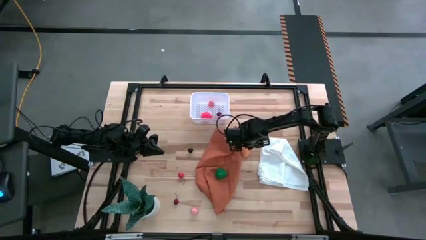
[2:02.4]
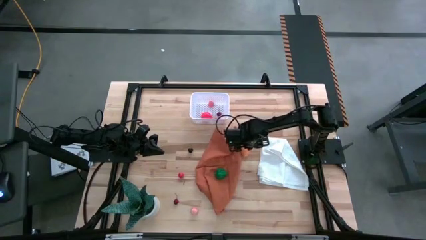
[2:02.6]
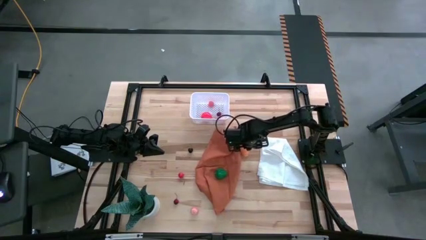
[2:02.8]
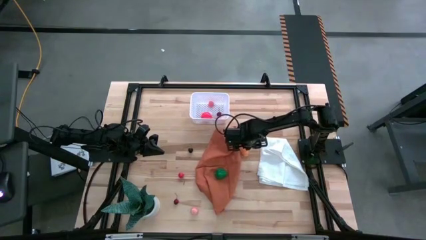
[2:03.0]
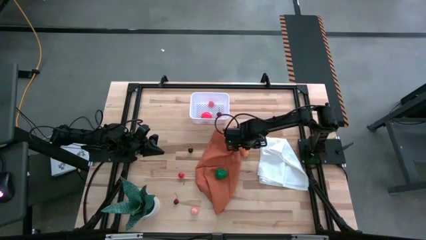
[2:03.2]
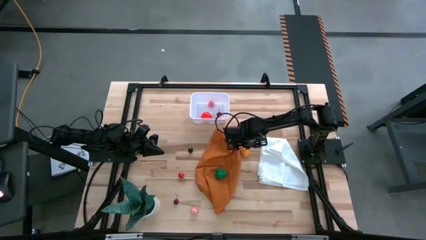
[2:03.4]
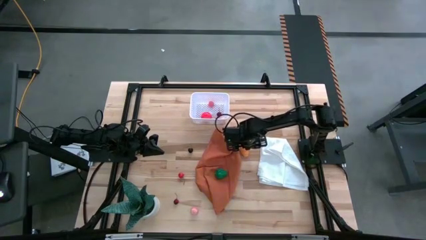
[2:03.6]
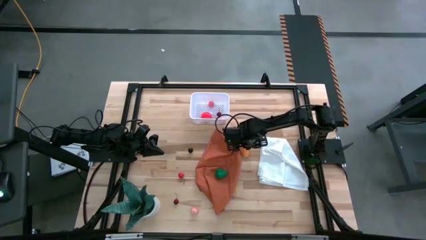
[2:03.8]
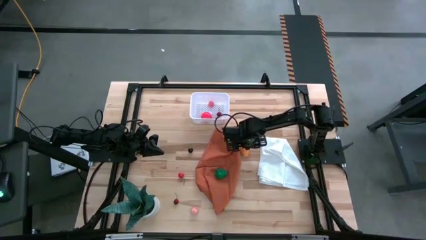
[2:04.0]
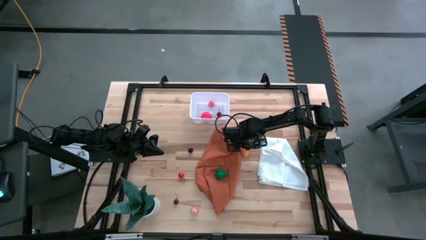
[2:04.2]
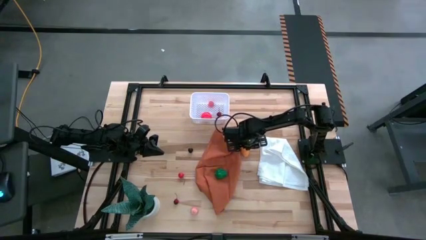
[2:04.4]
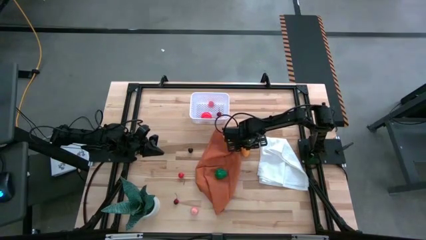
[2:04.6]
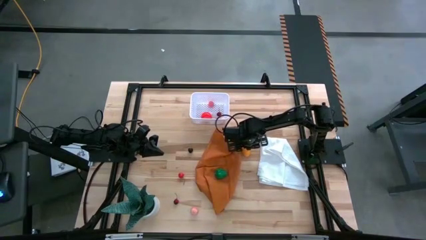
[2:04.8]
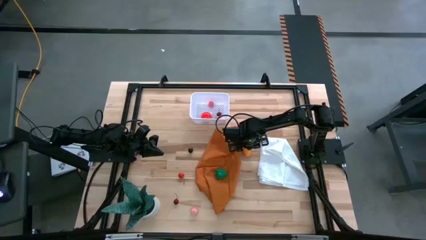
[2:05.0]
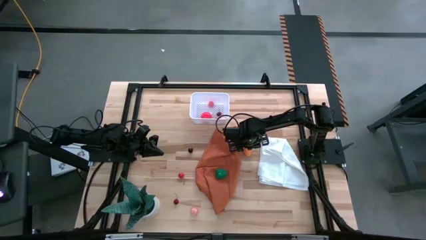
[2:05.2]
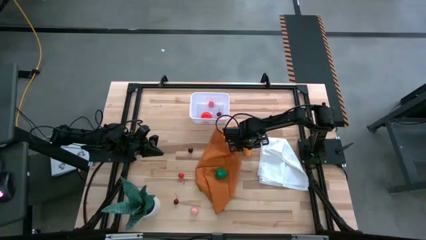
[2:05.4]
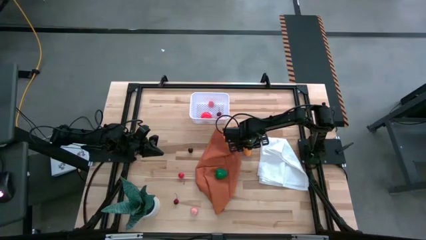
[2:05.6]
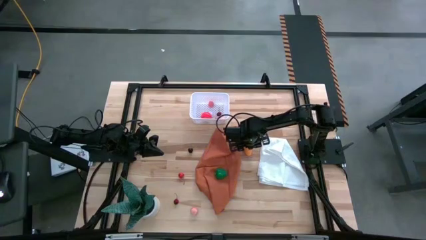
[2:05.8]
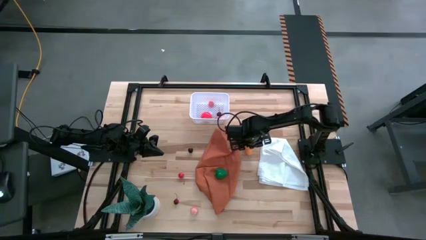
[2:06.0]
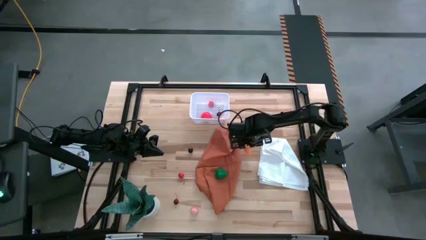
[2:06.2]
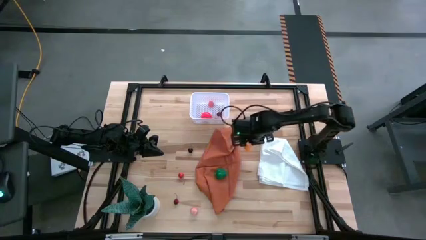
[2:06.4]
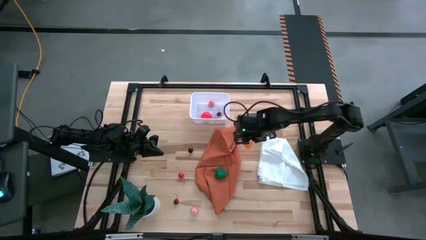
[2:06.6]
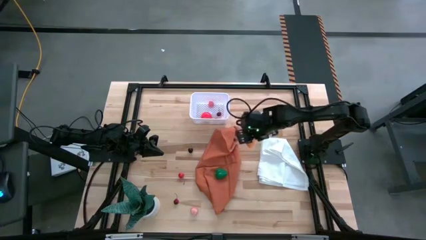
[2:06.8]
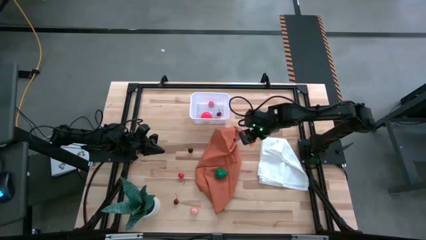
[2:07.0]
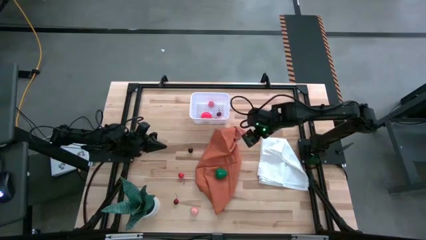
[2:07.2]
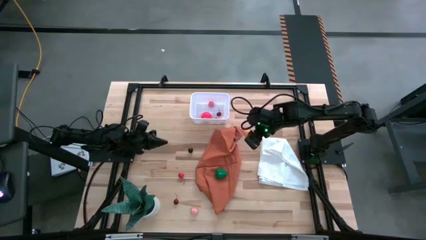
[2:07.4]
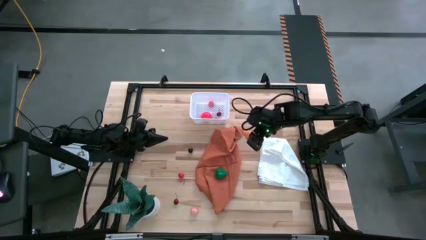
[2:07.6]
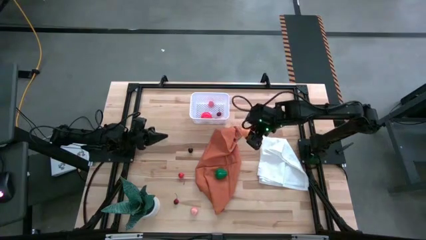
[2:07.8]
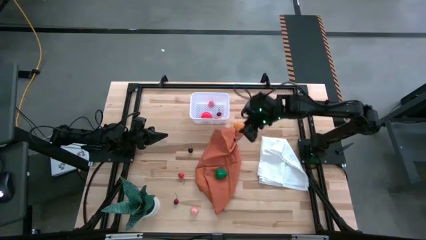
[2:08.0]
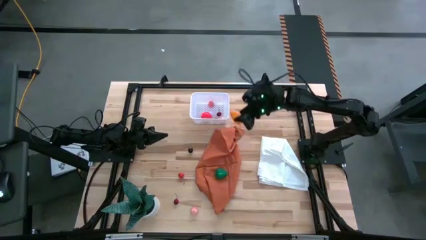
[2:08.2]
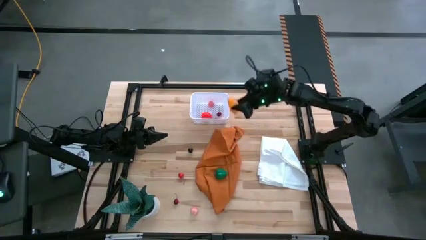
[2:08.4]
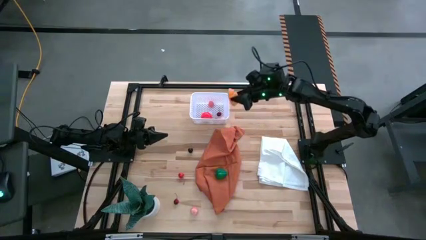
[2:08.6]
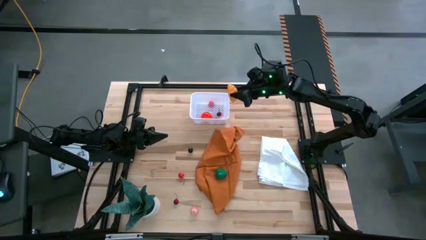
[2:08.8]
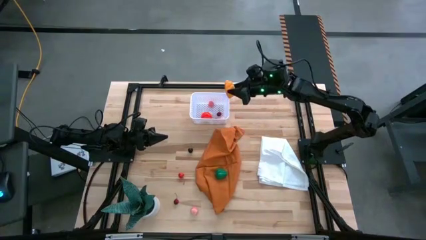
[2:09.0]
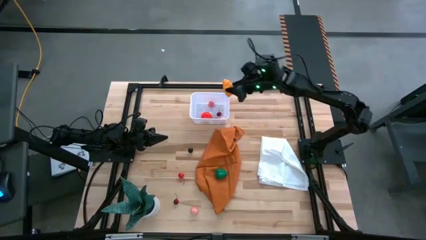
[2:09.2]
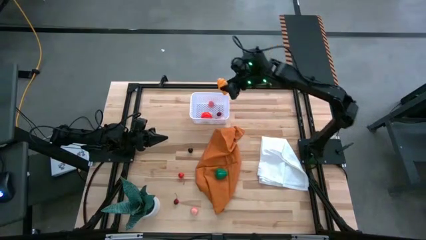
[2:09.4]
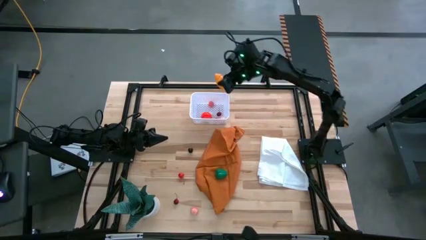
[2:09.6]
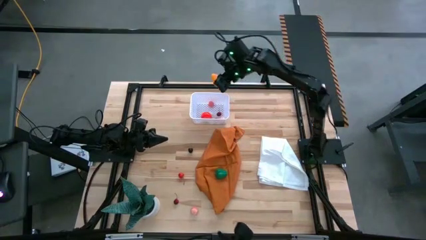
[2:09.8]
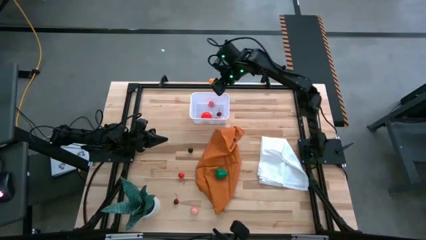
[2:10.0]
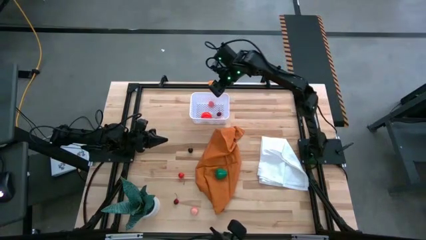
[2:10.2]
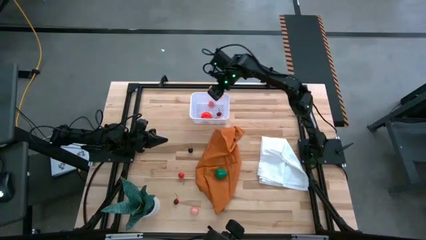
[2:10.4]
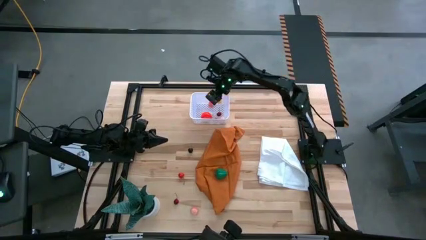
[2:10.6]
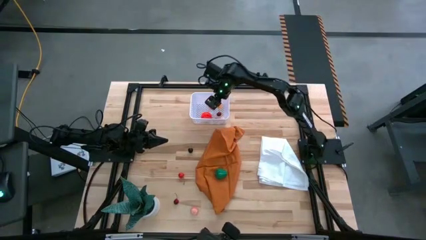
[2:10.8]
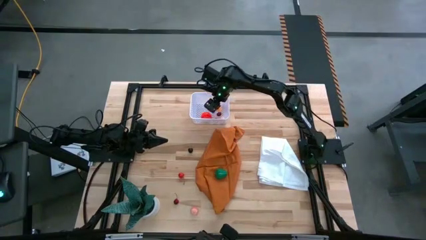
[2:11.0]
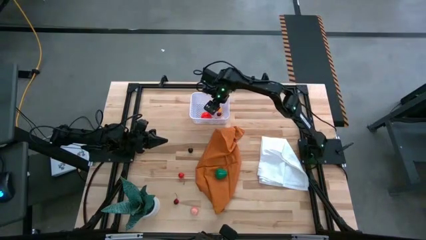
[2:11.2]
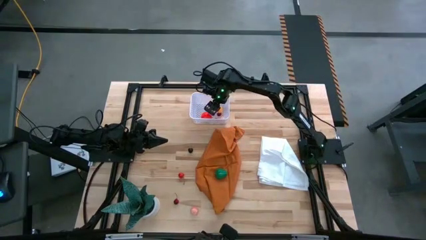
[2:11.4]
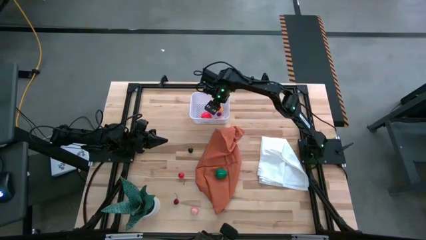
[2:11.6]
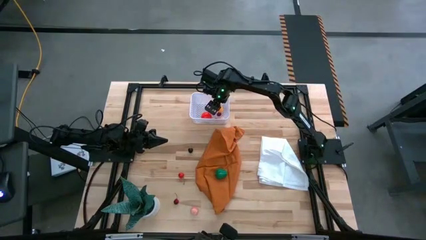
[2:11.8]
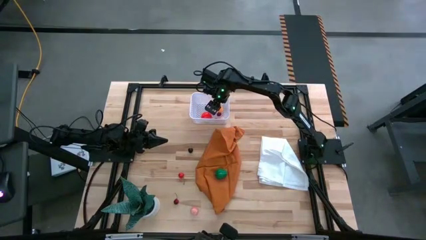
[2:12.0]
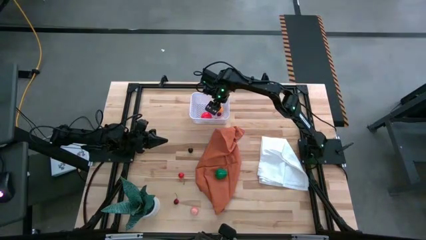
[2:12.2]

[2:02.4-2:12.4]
Task: Pick and placing Produce into tupperware
Put the orange croissant into the white basket
